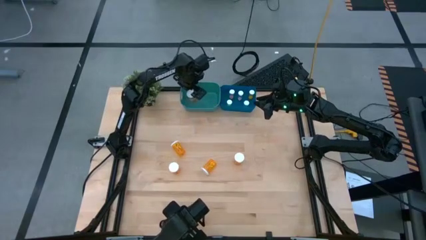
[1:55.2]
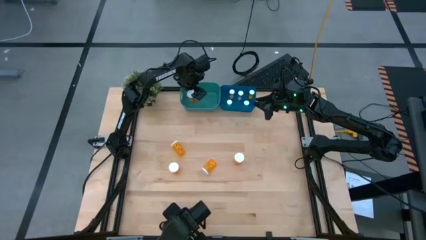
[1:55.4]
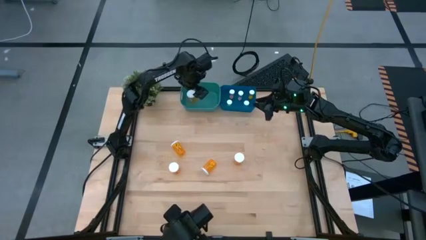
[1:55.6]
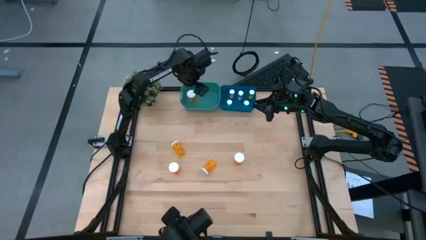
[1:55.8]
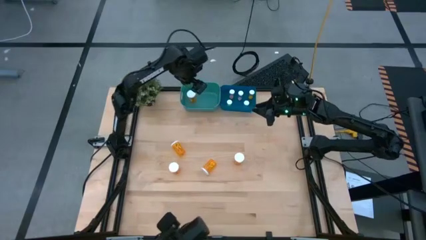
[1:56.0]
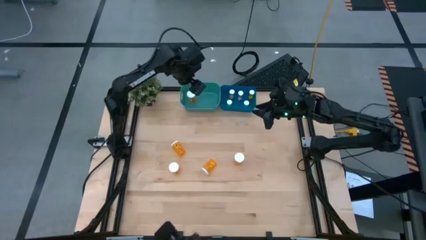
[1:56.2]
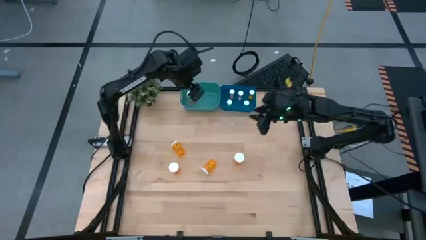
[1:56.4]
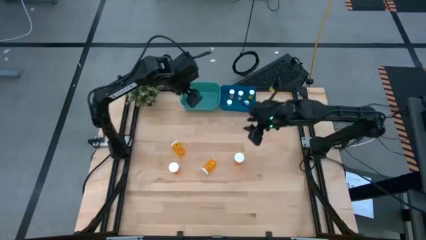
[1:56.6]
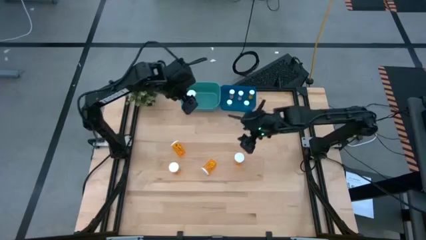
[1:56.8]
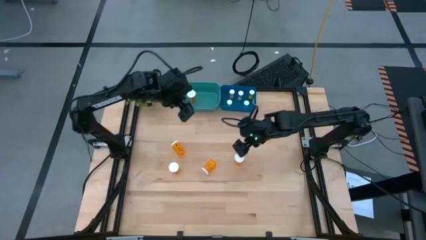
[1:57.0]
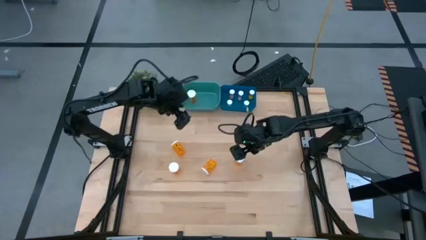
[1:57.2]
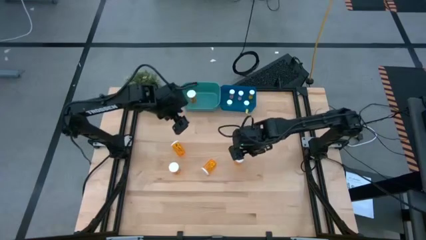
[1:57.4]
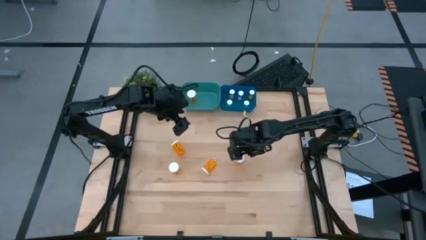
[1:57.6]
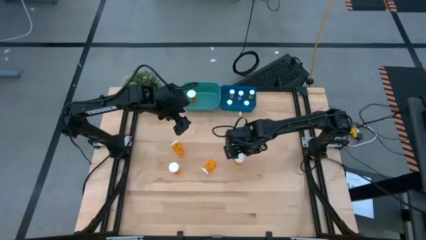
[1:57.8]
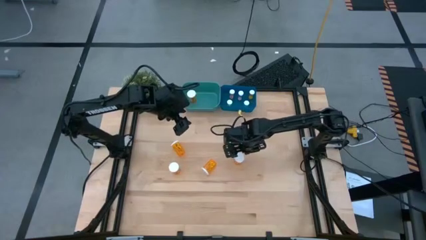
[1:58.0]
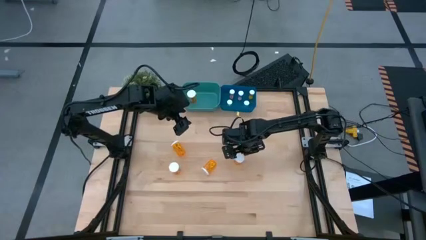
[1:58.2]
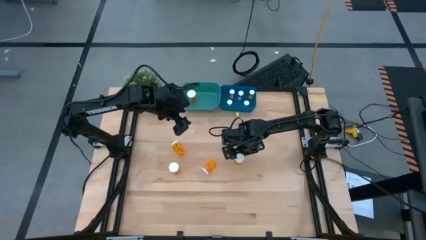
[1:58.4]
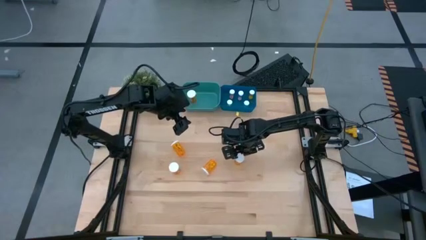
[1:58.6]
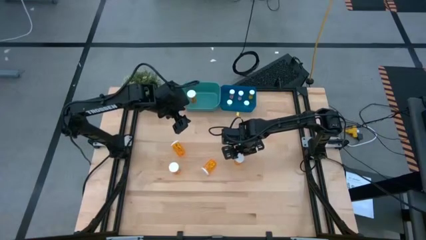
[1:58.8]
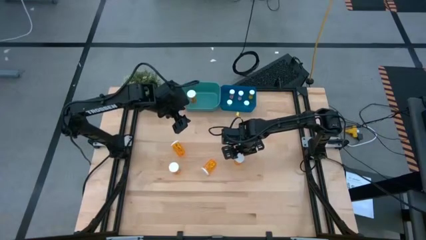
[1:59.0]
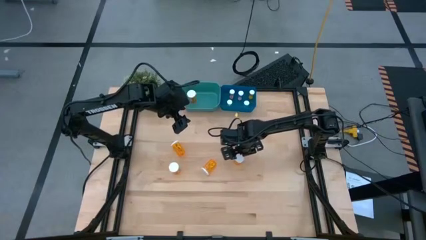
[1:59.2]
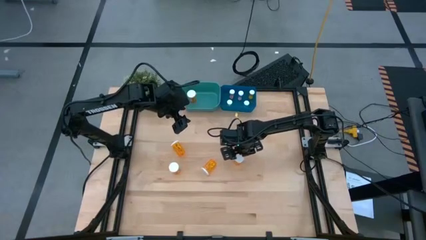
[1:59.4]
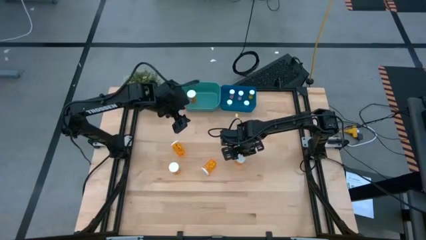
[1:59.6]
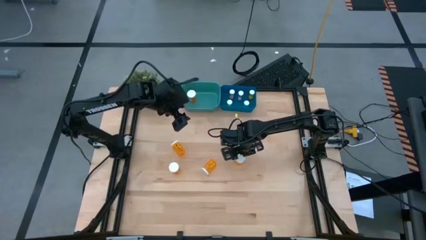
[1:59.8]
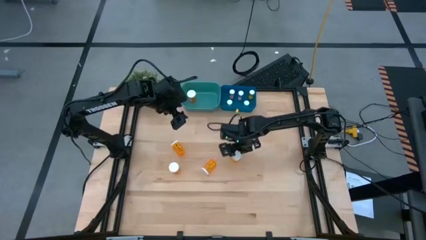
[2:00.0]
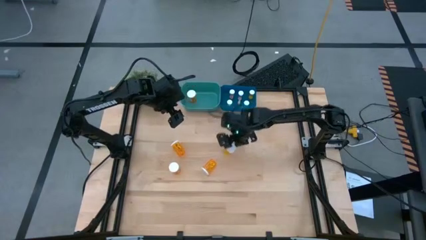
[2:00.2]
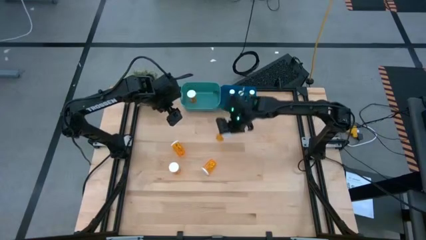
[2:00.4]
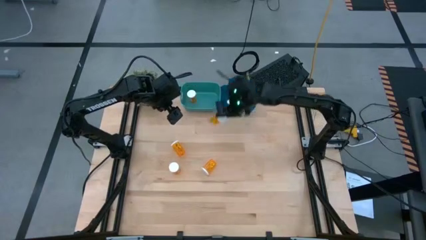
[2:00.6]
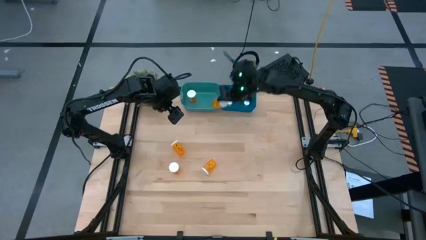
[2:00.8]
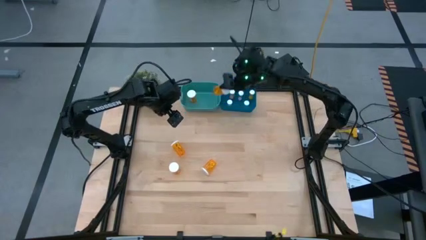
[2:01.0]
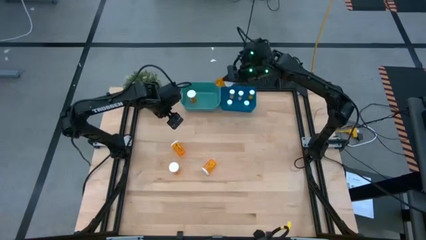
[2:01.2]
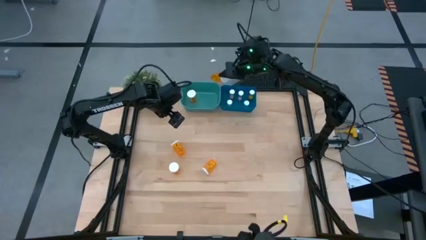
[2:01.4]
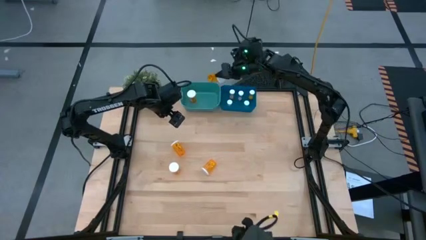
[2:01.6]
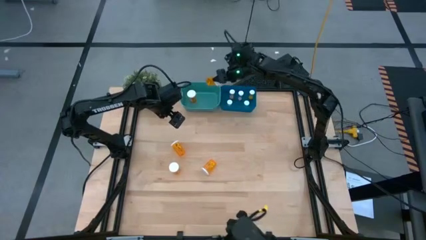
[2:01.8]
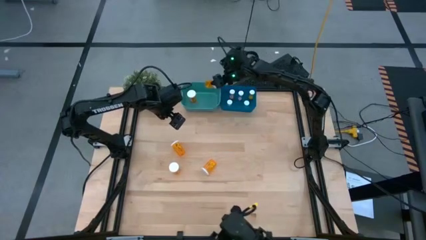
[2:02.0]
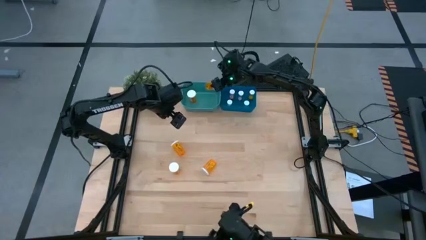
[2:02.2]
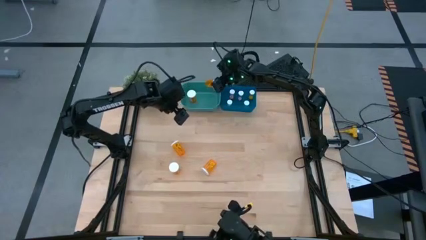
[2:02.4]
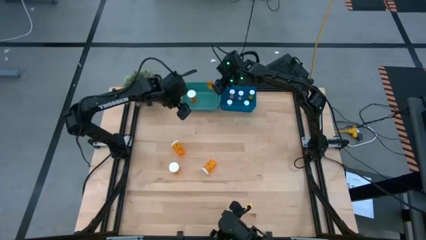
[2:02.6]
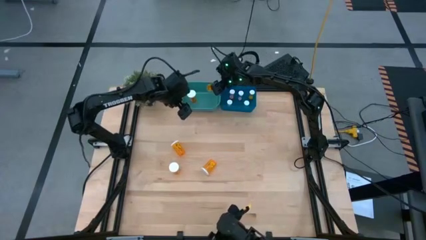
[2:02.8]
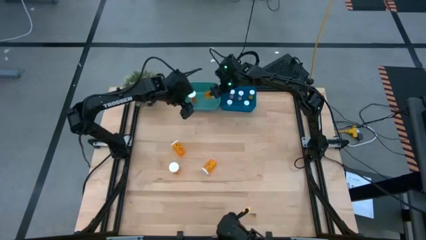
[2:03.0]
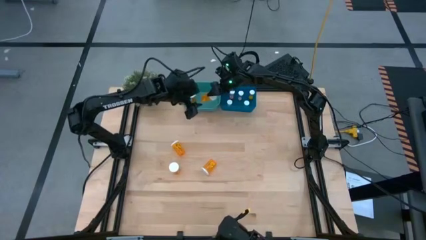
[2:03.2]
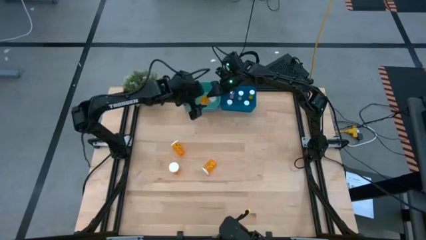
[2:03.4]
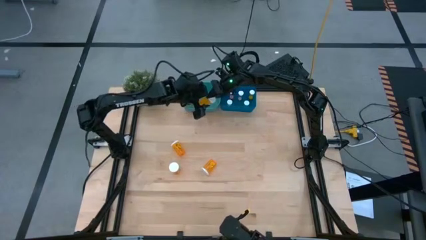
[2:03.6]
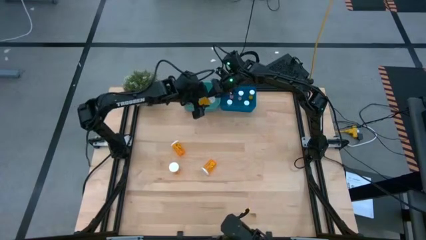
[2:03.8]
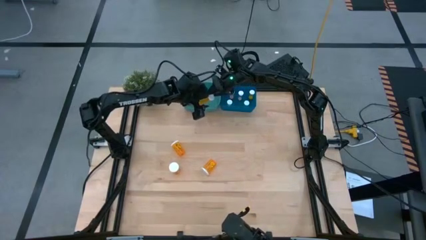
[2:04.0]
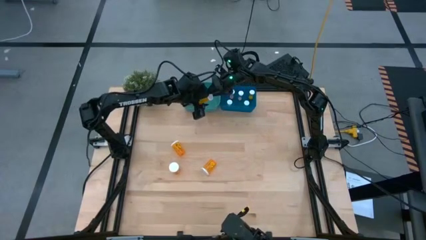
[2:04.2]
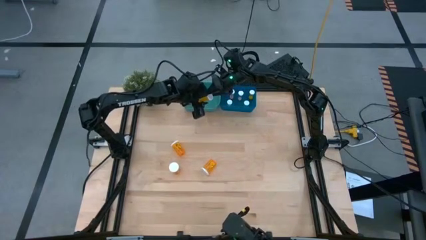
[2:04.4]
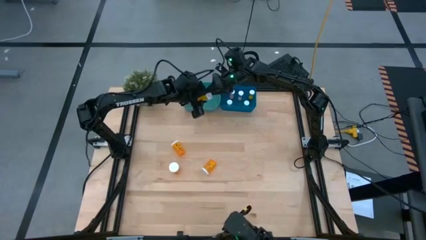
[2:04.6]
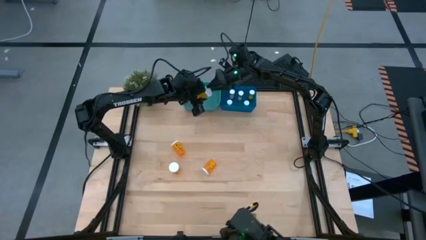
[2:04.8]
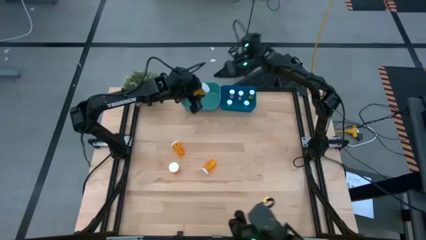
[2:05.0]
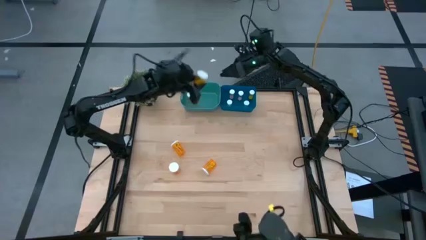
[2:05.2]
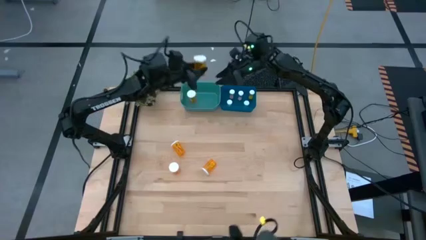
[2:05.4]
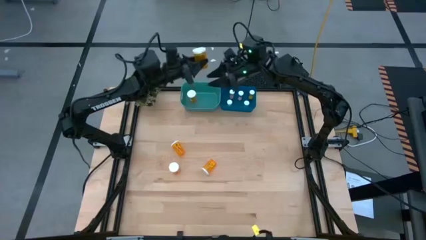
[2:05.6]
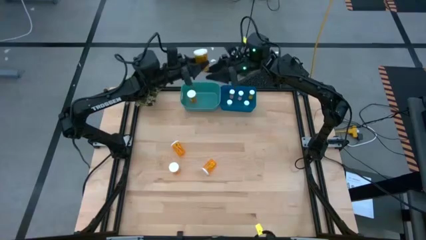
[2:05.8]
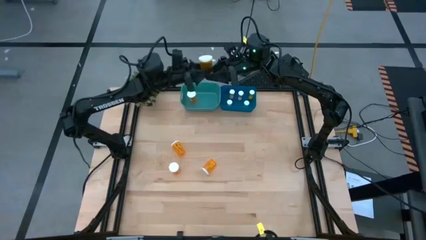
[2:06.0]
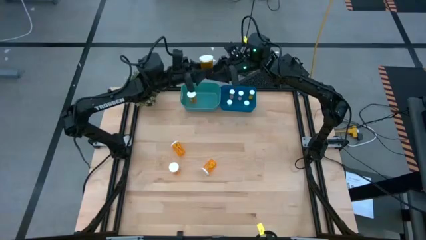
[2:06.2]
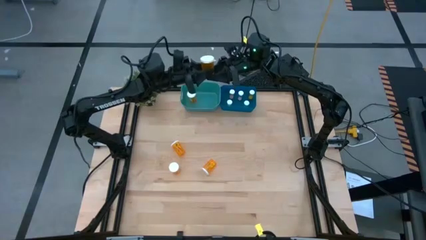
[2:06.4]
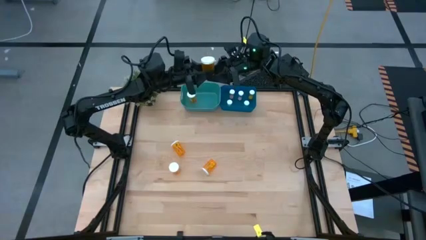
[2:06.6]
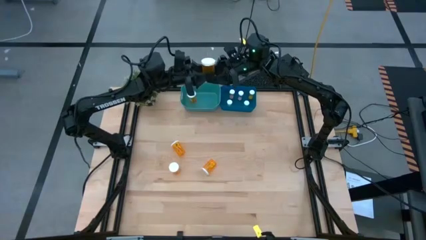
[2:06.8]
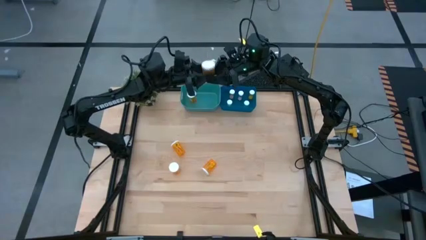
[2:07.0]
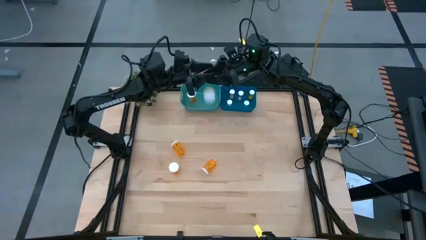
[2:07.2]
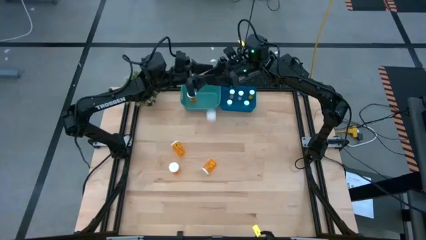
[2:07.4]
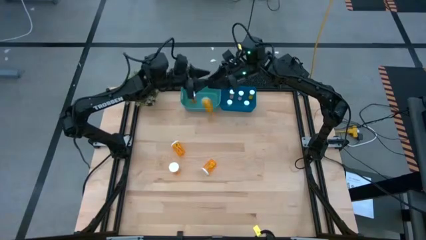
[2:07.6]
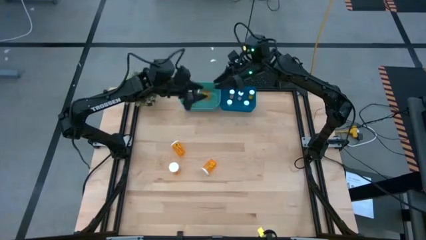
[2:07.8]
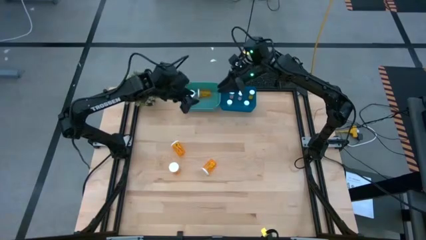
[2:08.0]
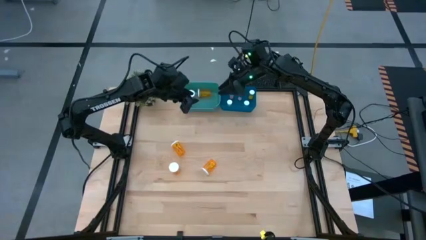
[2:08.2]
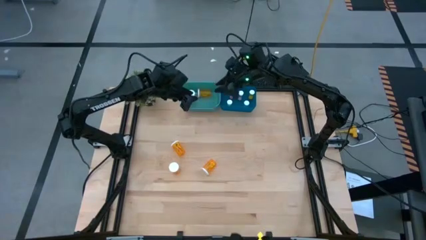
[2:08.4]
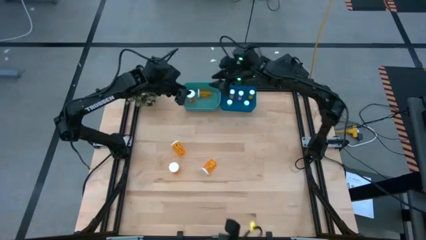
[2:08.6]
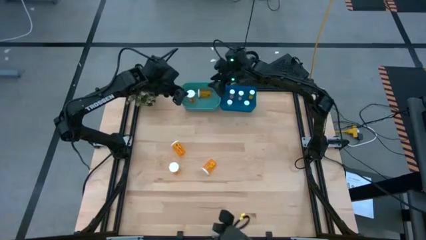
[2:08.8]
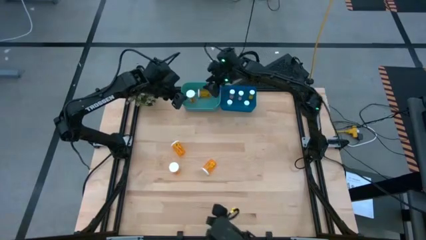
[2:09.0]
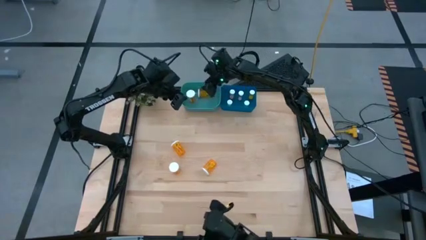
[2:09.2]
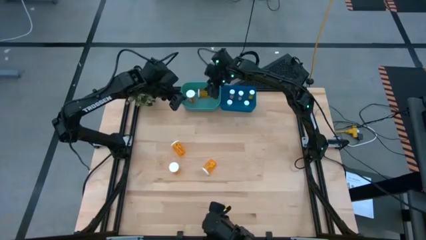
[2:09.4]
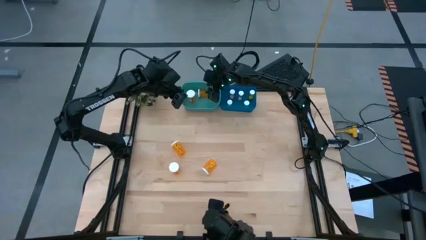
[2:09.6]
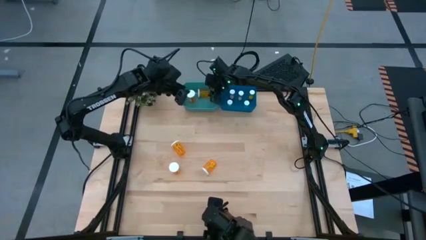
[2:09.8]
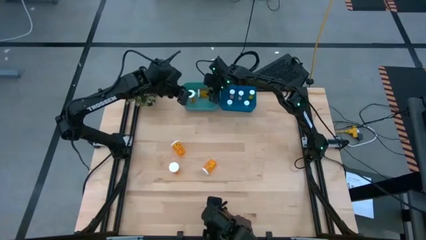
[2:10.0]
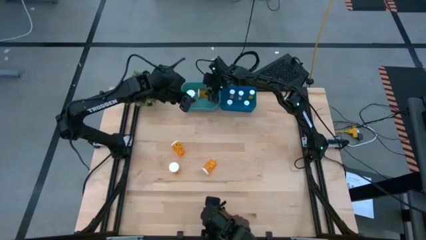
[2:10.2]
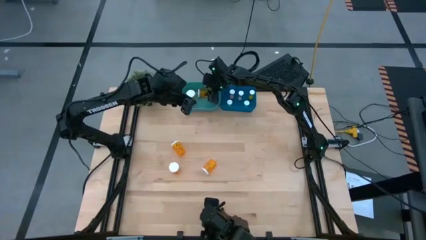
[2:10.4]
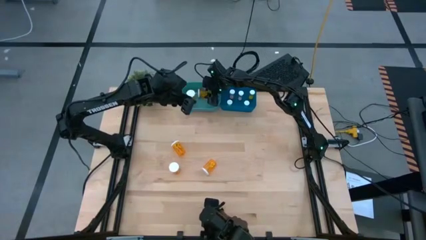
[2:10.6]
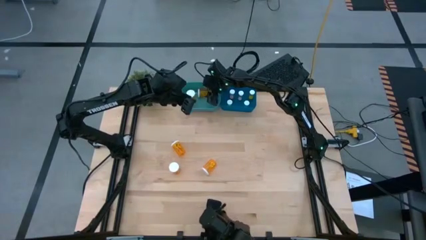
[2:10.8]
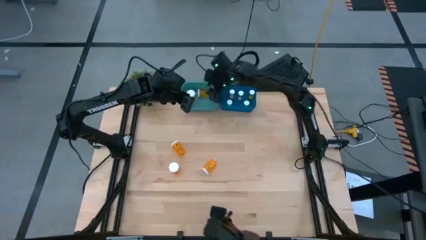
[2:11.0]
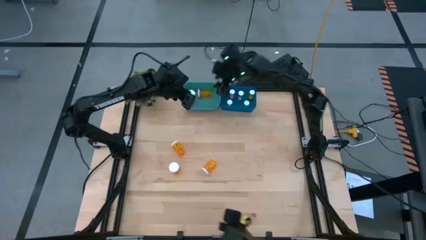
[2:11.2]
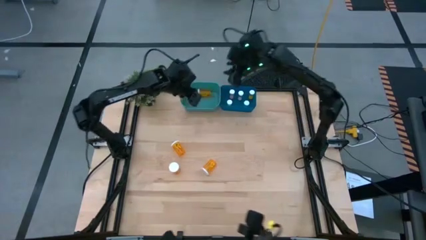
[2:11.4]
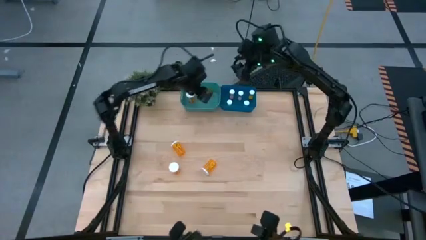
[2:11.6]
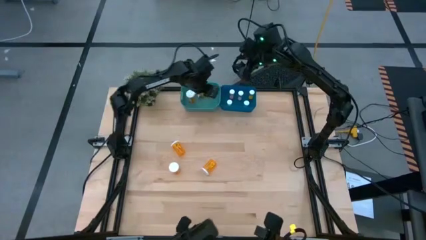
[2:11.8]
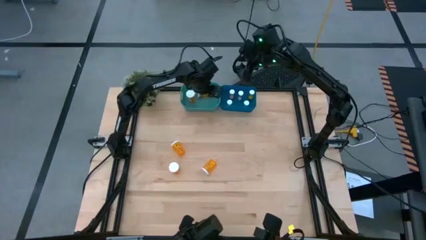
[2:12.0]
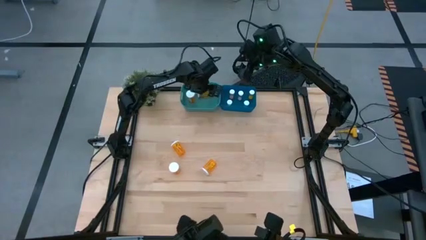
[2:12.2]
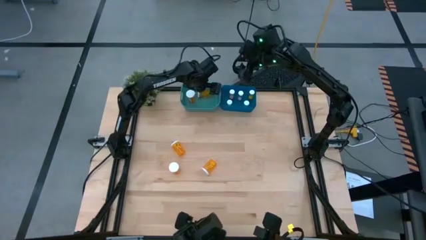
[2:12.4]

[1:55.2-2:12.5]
Task: Pick and place medicine bottles into bin by pill shape (circle, oval)
Put the large orange capsule bottle into the green bin
